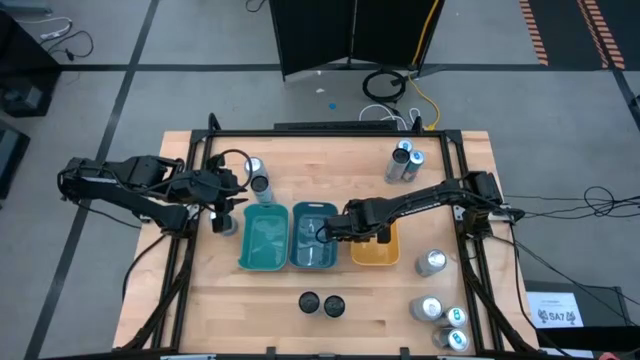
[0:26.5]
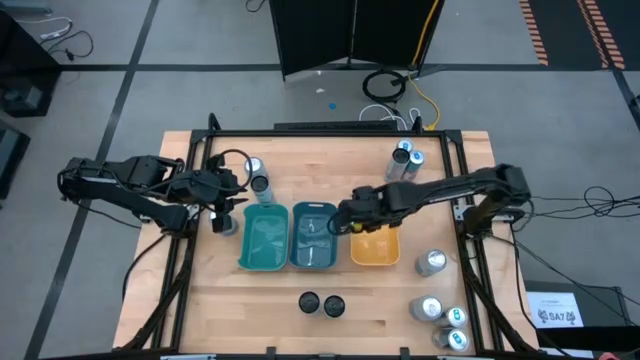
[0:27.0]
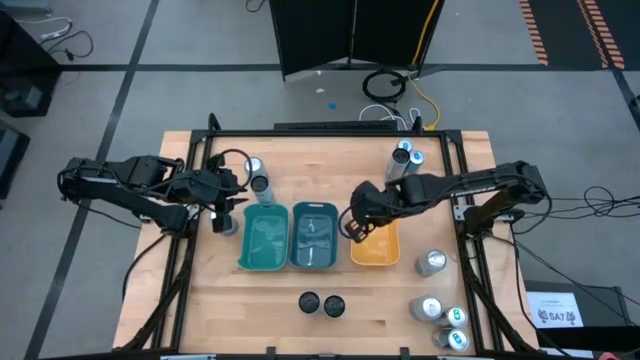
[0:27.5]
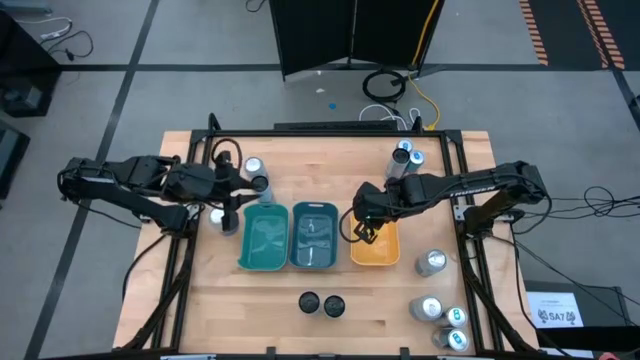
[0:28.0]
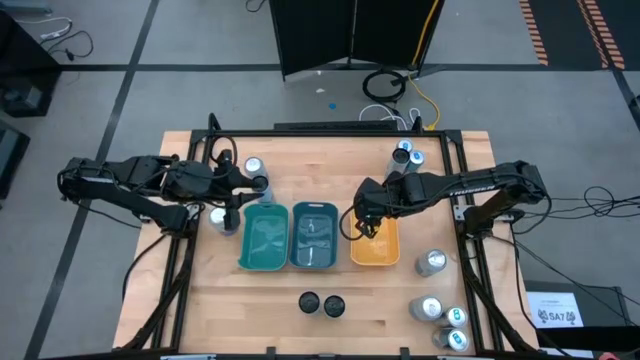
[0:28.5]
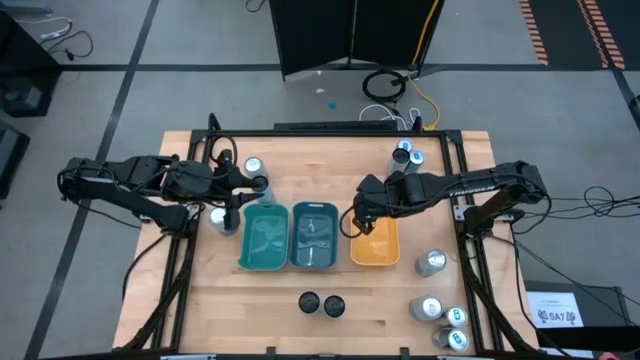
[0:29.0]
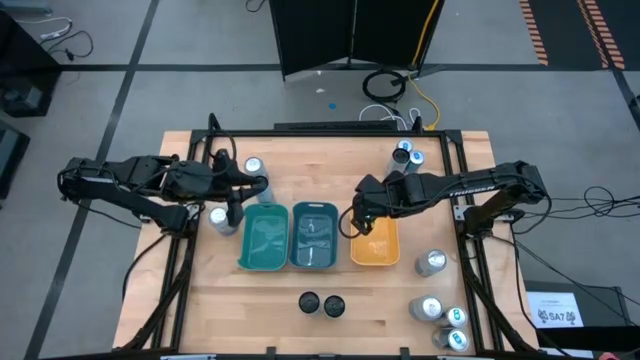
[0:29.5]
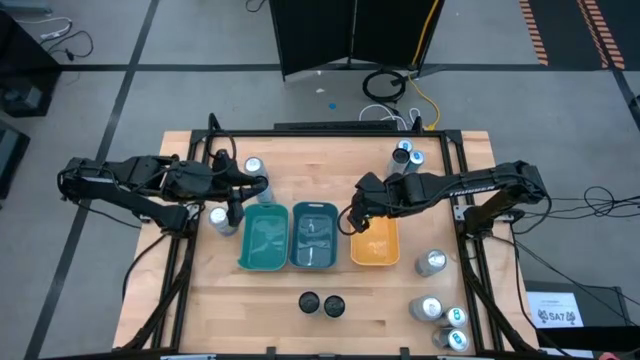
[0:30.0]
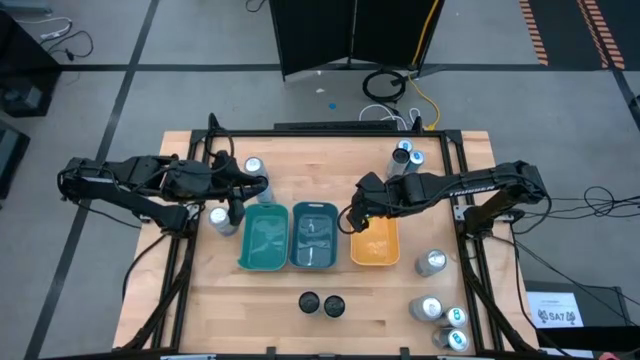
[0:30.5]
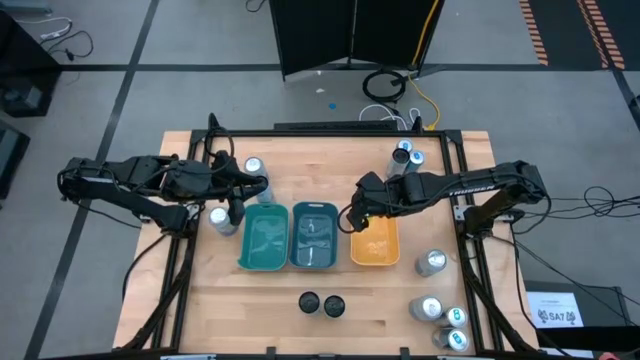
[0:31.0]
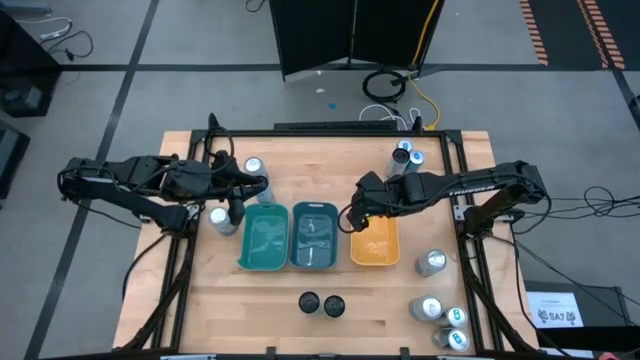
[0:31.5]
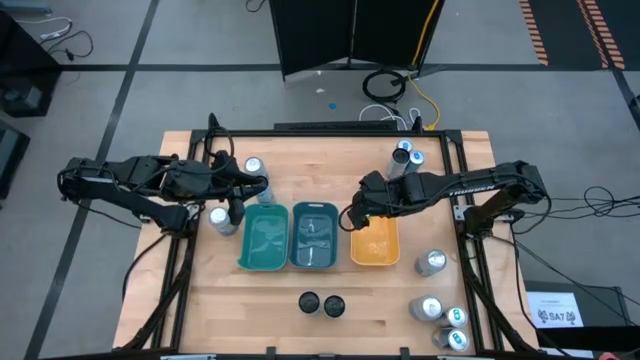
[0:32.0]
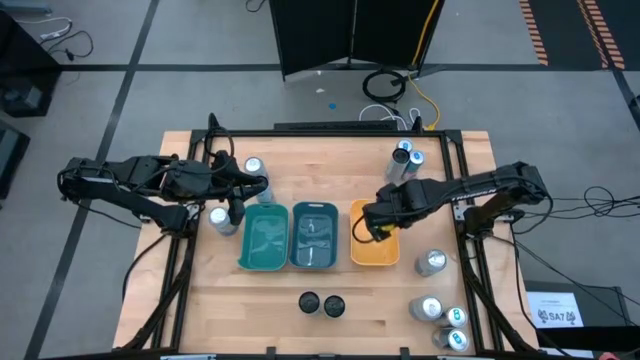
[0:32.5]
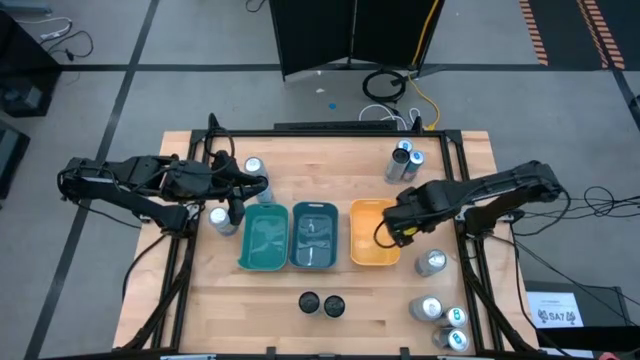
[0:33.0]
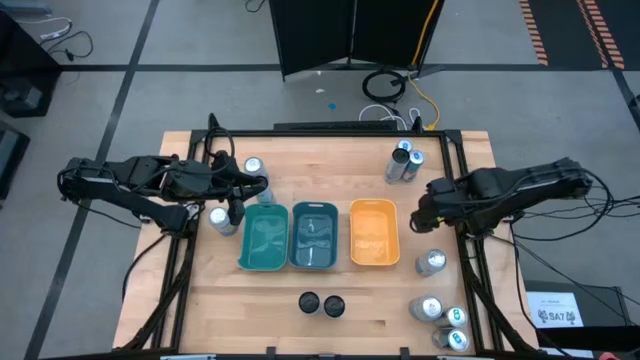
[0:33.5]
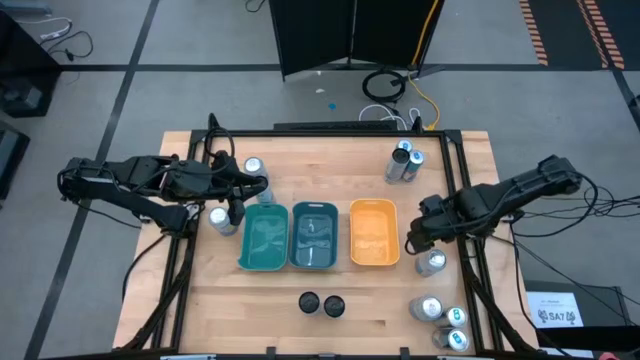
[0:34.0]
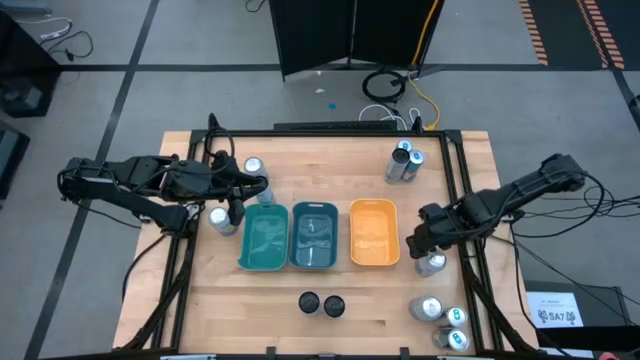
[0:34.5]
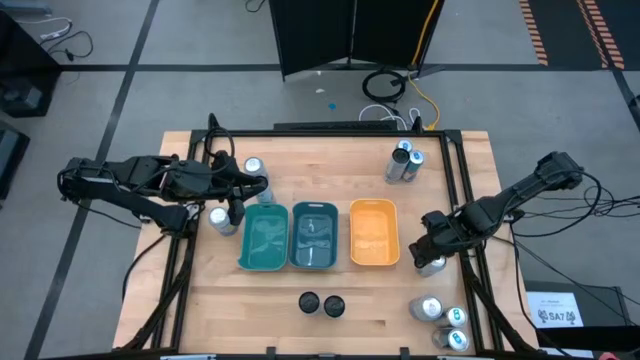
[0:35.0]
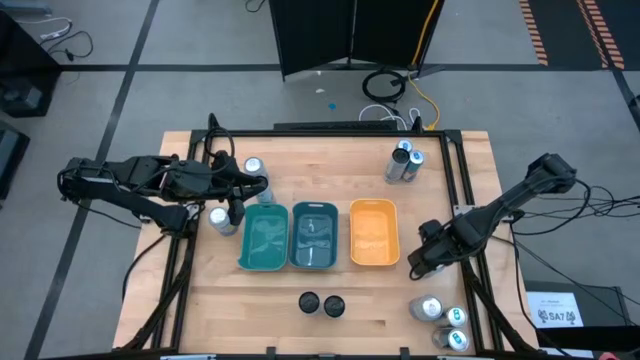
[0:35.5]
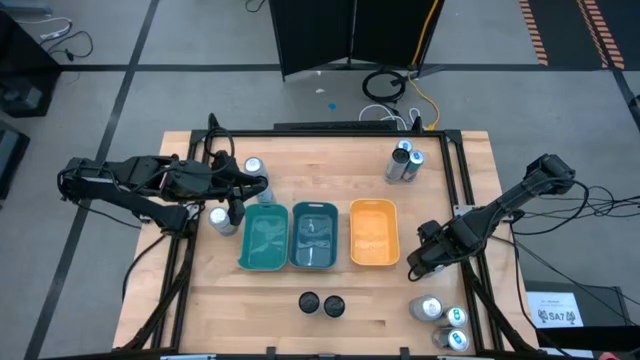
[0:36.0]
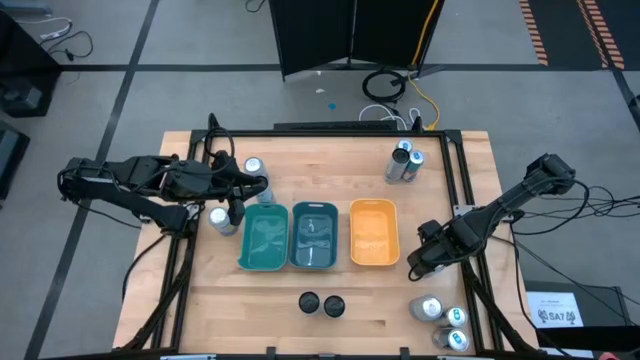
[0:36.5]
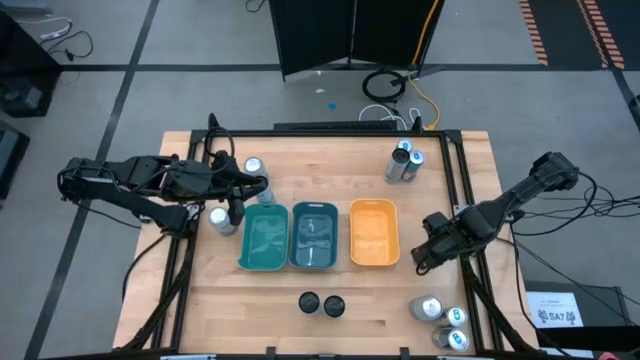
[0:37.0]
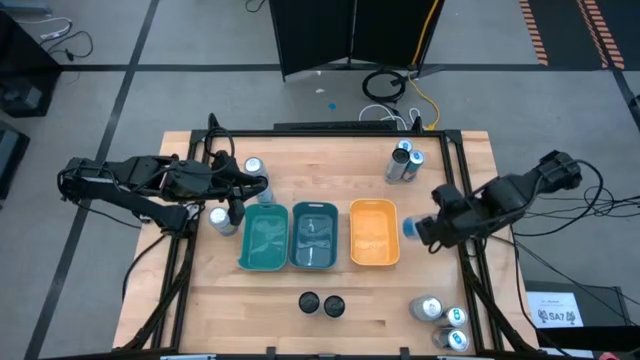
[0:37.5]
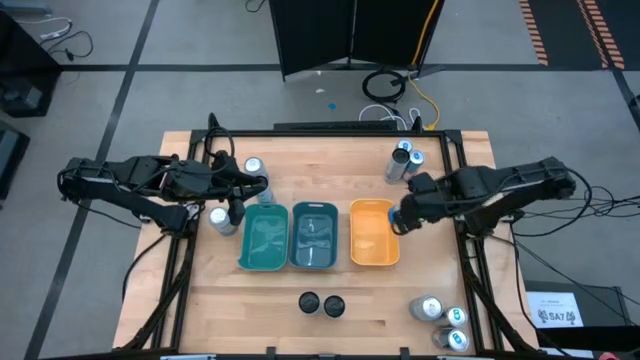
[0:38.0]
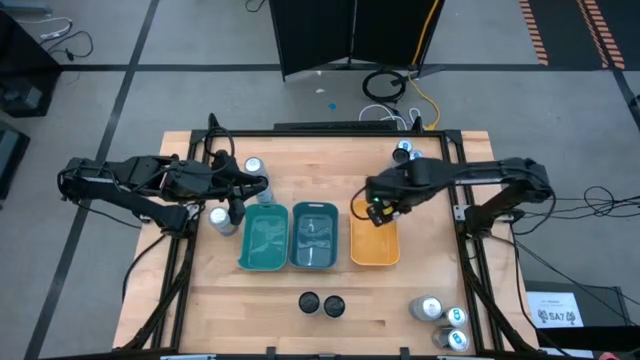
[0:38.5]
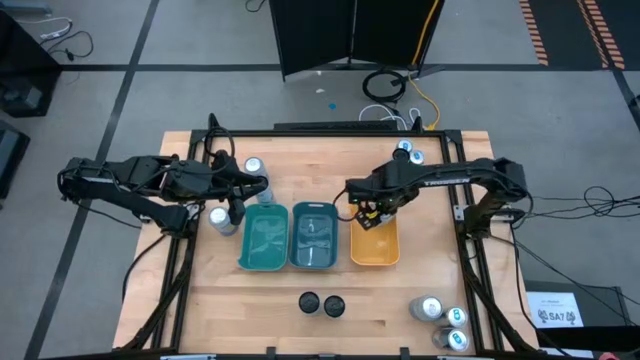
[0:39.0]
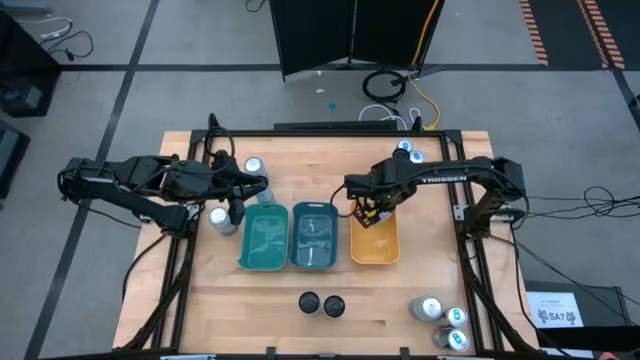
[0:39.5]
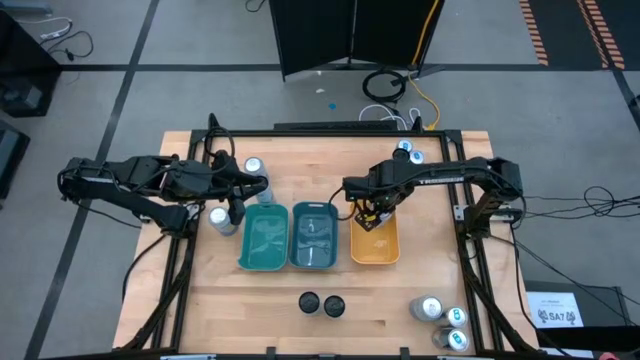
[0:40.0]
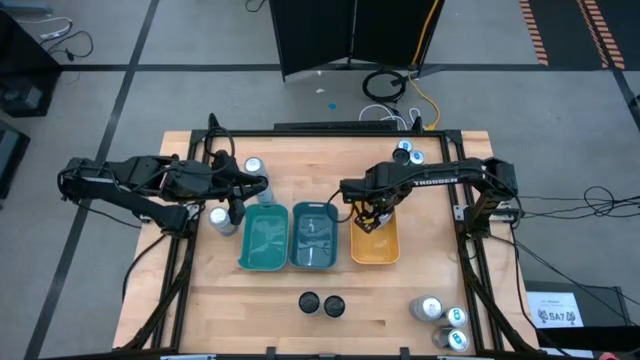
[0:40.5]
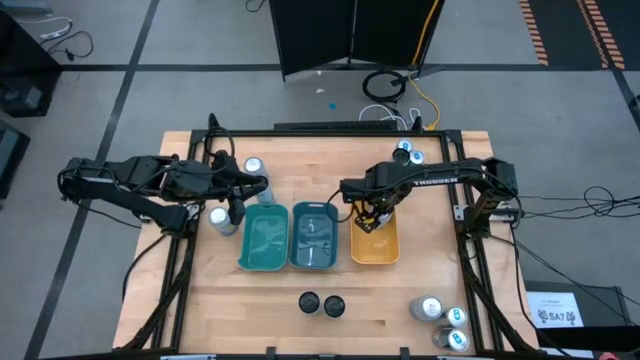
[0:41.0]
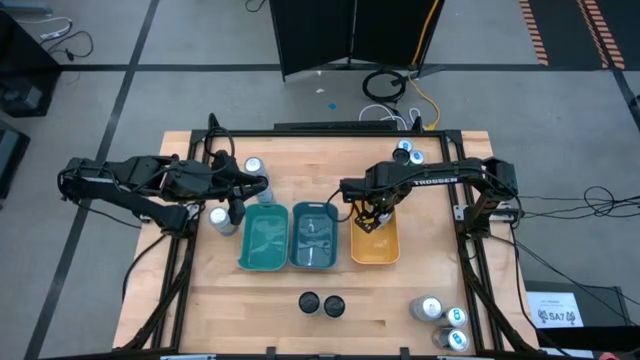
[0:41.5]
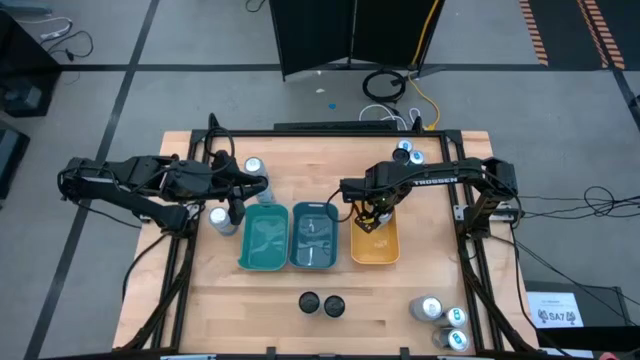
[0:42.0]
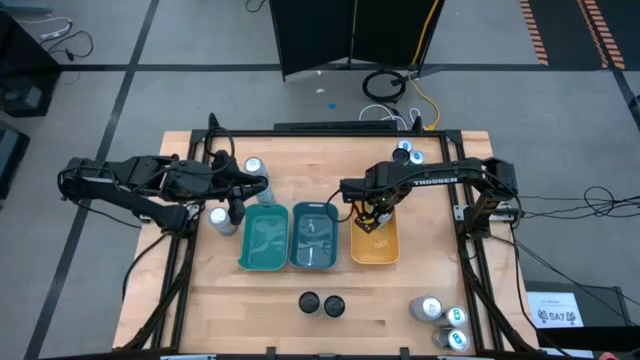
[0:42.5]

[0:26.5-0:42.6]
Task: Sort soda cans
Put the middle right silver soda can into the yellow bin

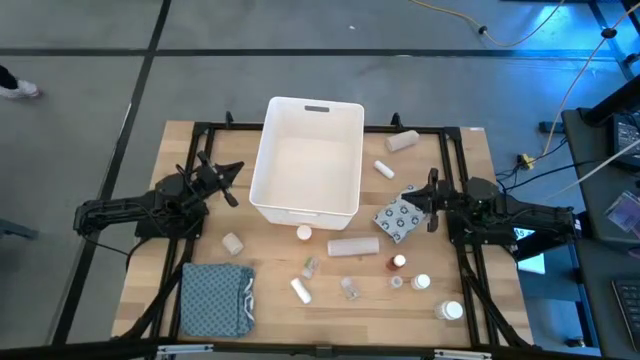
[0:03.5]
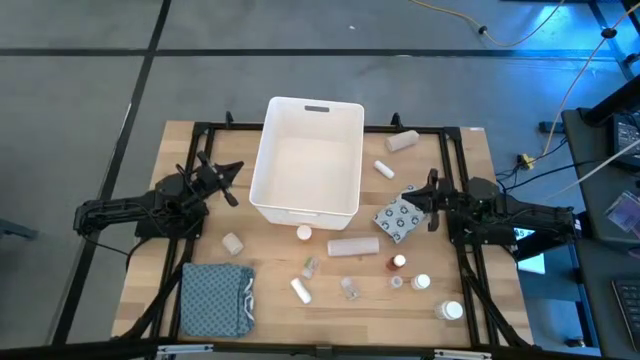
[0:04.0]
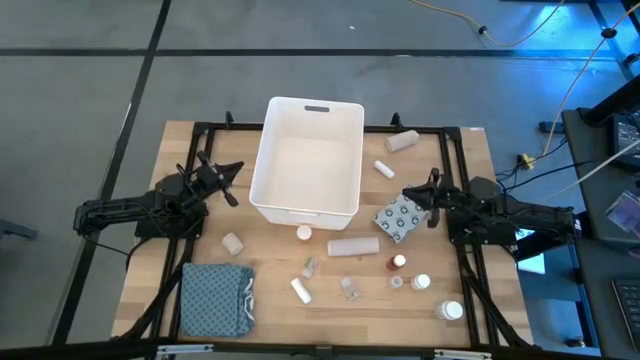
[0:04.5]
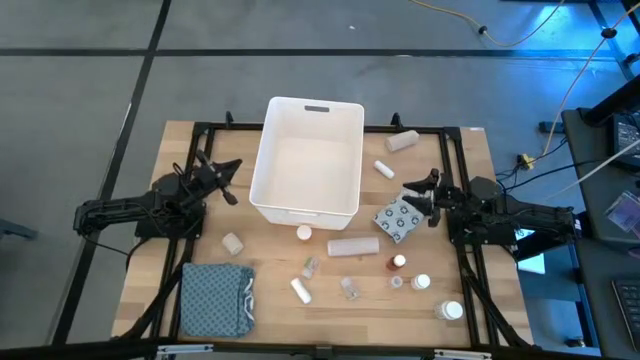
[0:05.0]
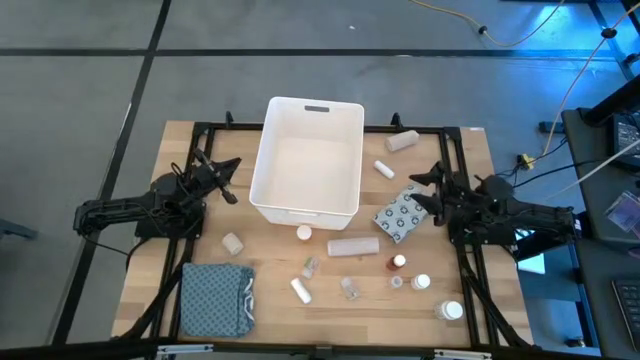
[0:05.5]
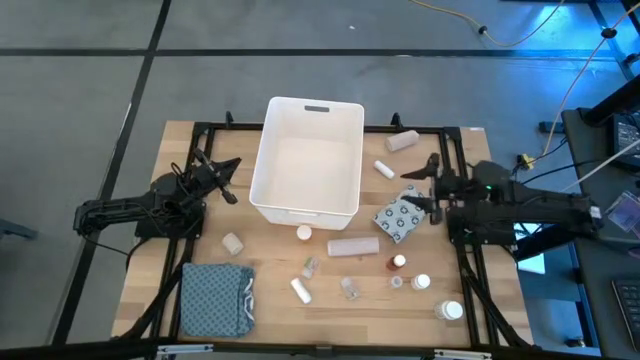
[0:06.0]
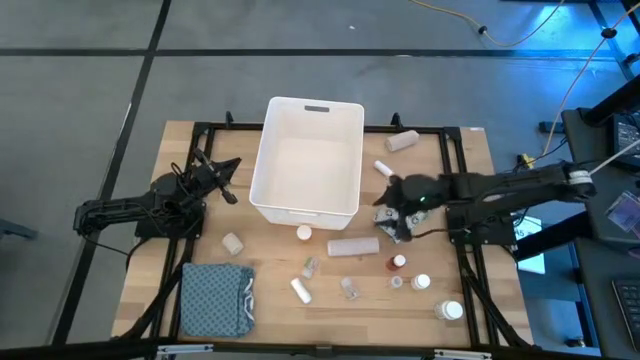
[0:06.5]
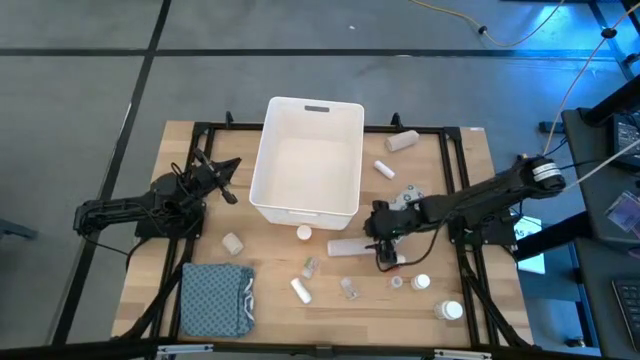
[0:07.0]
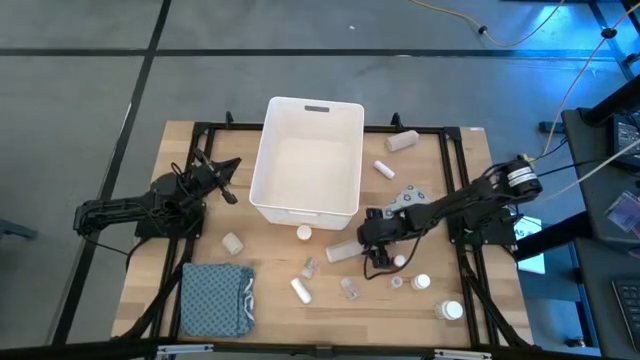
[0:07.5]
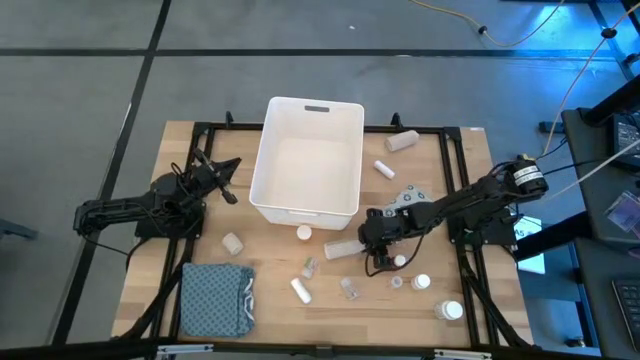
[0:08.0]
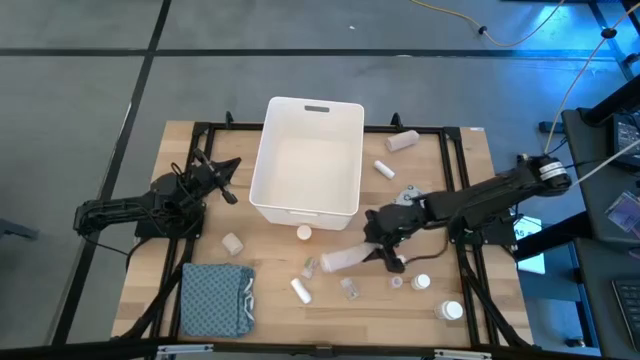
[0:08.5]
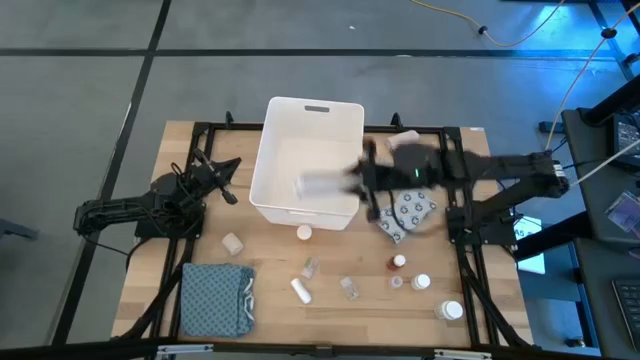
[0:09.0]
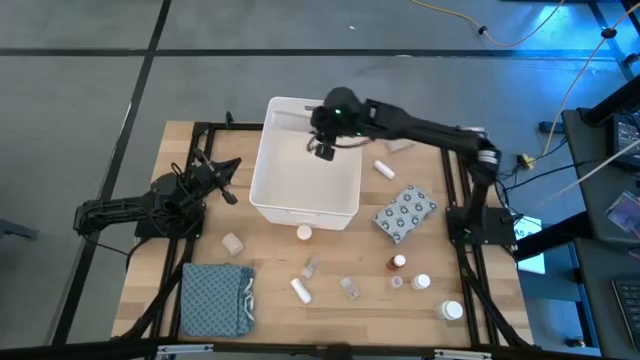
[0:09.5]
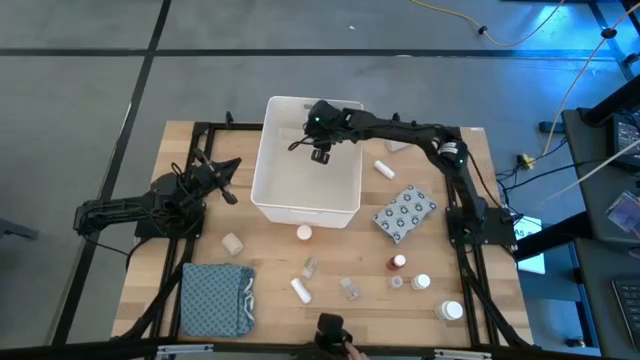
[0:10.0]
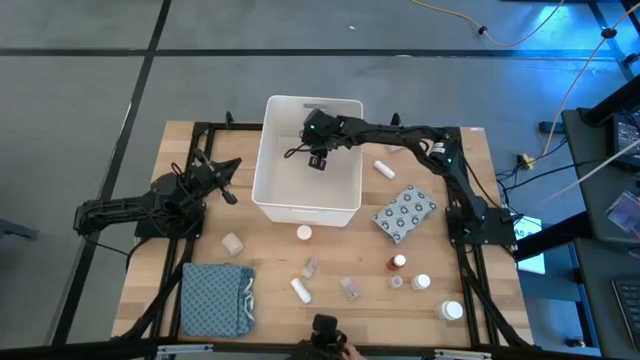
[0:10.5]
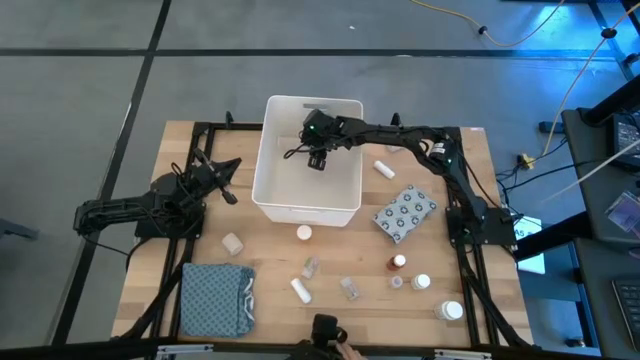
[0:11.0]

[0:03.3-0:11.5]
Task: Pick & place medical supplies in basket/bin
Put the bottom right rolled brown bandage into the white bin
